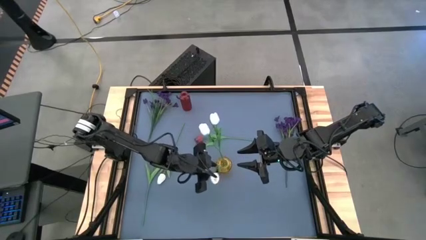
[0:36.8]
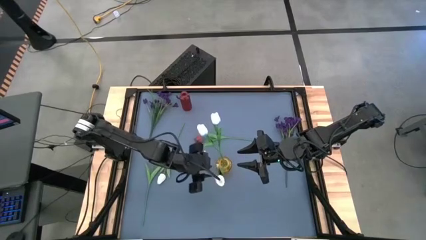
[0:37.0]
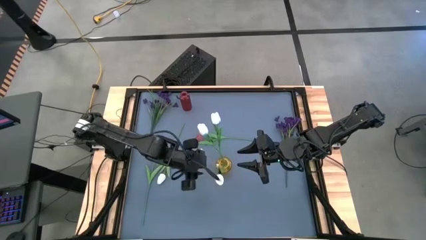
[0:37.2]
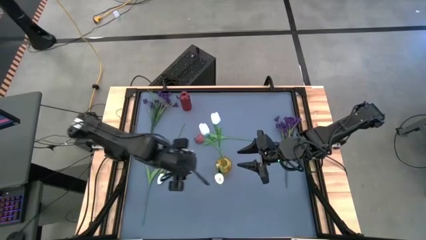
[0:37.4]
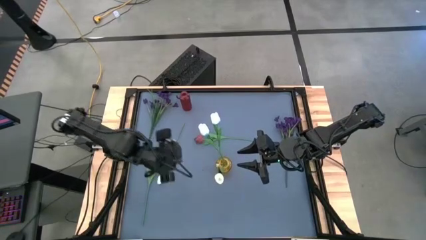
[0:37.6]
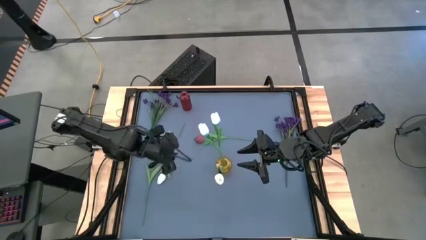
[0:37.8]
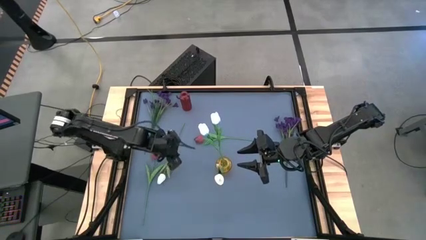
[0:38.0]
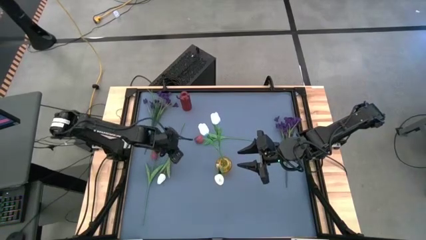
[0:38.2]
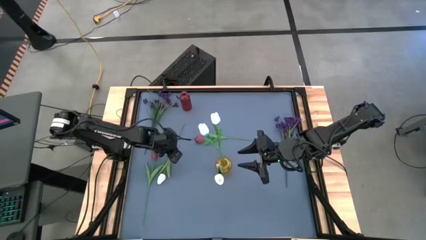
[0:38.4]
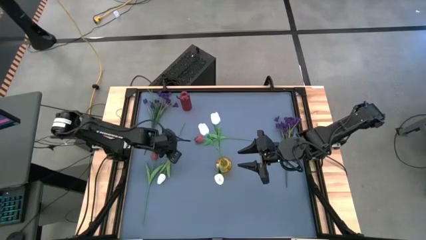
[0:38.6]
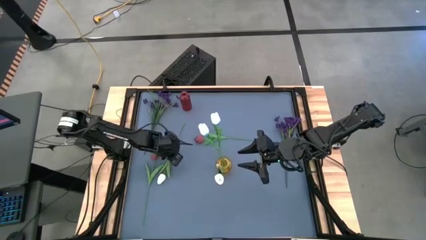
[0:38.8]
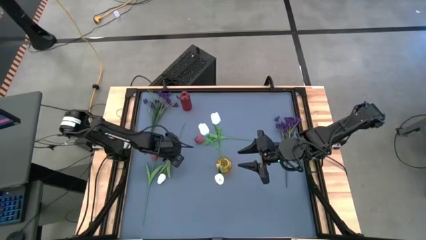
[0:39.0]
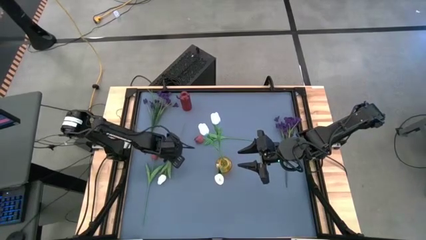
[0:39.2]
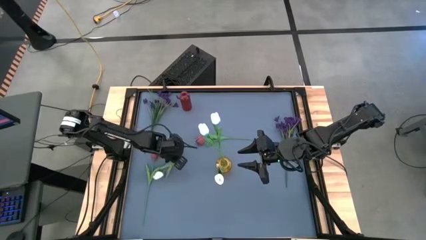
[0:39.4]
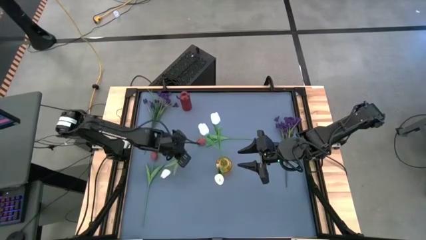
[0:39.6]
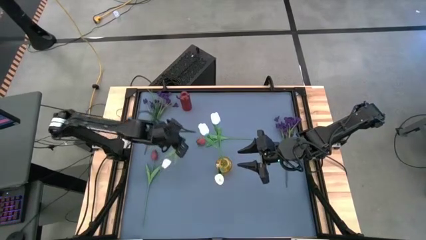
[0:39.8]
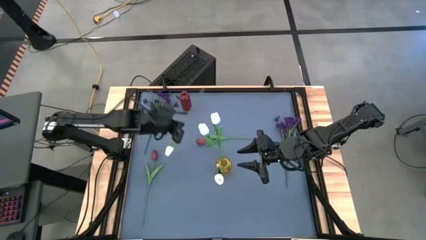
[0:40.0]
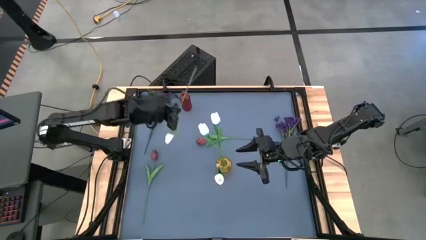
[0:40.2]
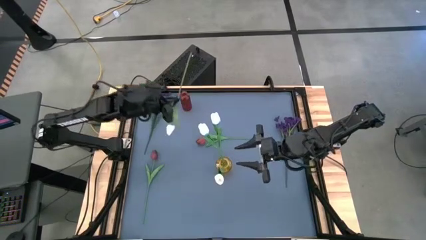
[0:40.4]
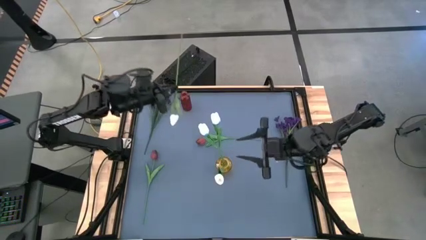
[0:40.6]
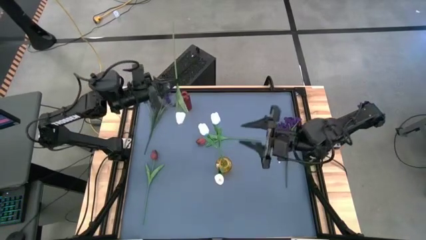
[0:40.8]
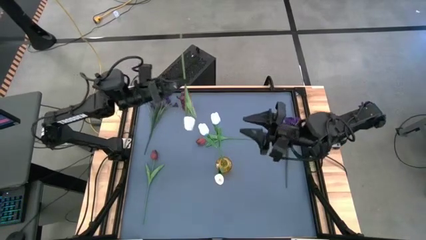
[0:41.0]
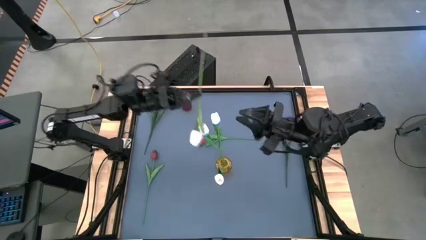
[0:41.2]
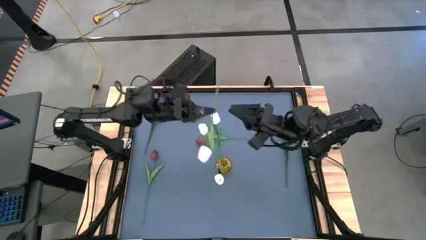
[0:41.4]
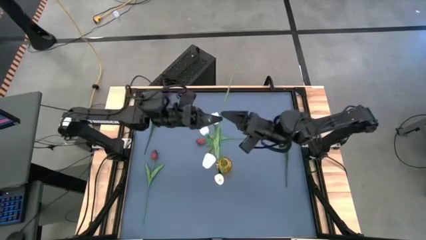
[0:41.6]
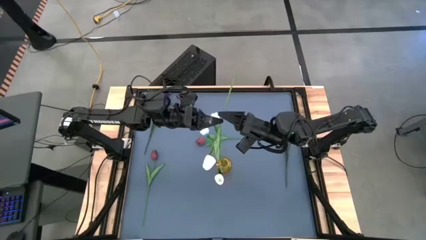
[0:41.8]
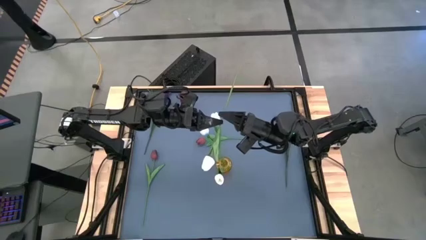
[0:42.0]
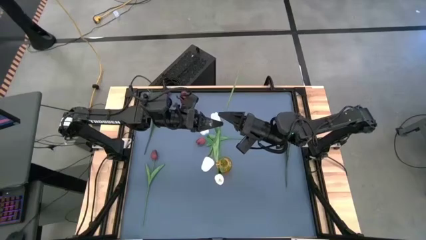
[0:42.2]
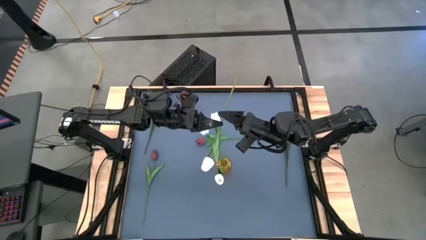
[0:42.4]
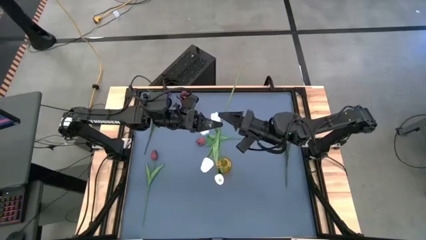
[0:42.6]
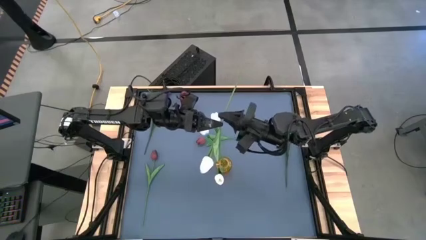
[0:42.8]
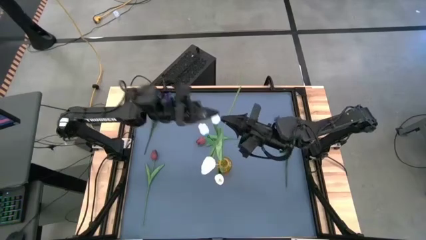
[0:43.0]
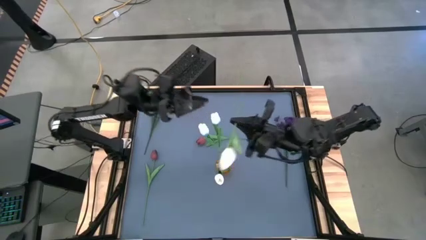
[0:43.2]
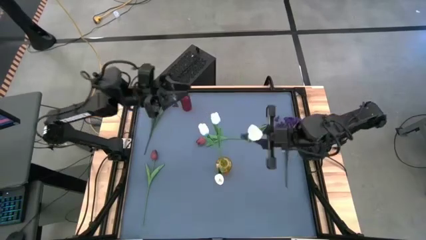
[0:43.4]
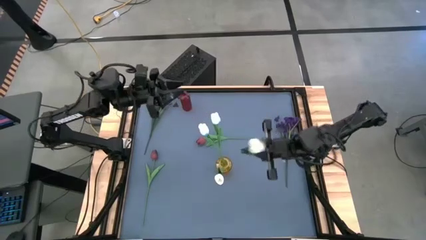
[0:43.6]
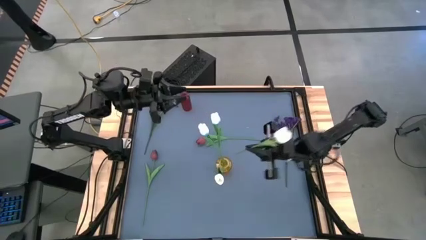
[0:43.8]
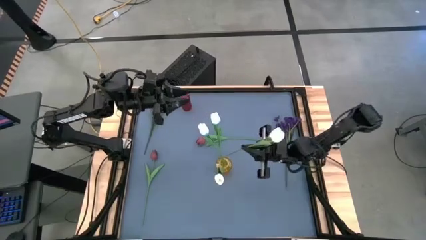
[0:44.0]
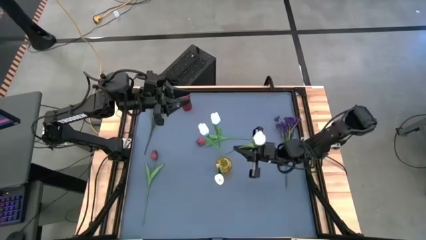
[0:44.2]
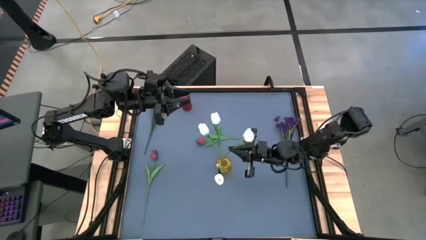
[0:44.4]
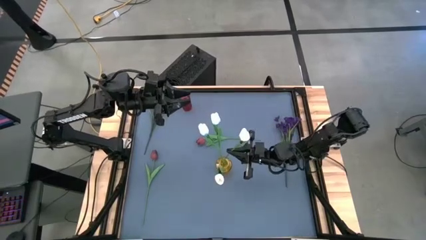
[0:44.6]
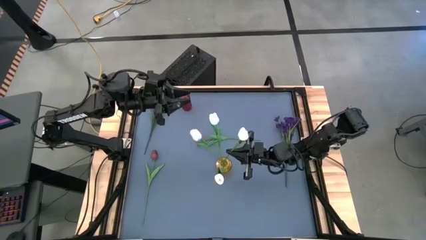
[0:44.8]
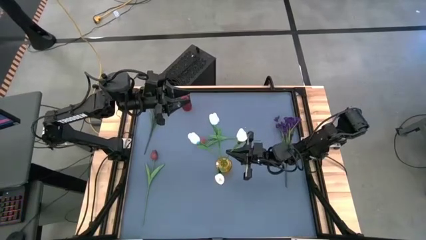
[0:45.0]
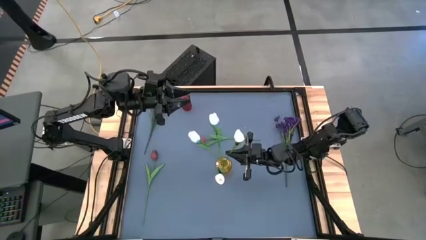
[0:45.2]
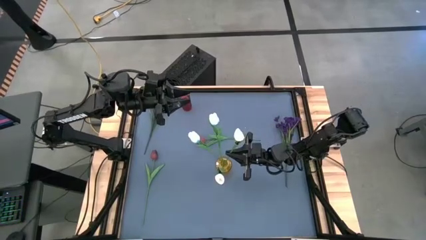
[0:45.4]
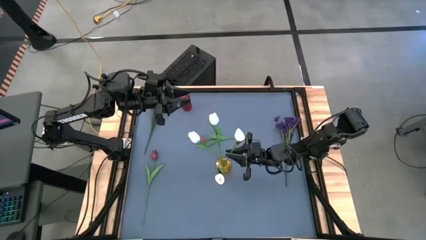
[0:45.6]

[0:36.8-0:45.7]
Task: Sort flowers into vase by color
Put the white flower into the yellow vase

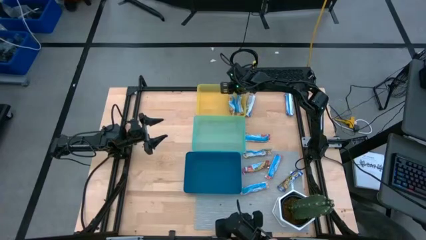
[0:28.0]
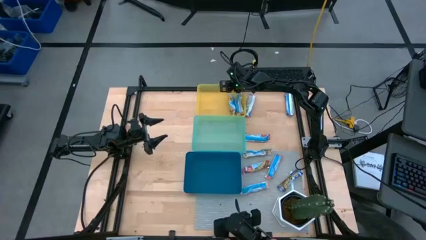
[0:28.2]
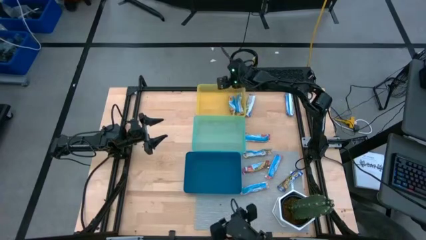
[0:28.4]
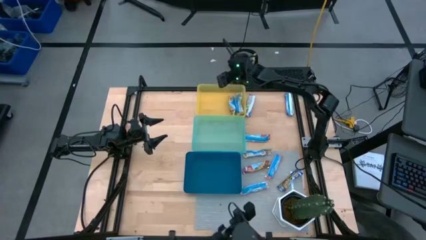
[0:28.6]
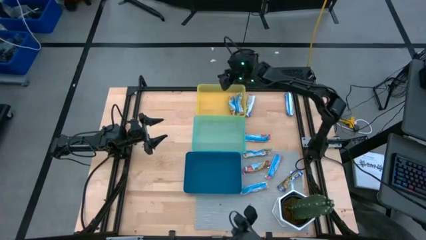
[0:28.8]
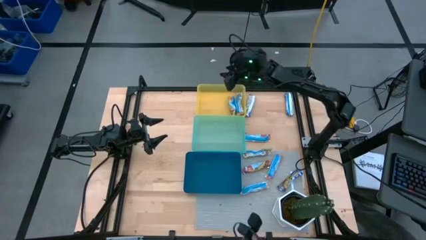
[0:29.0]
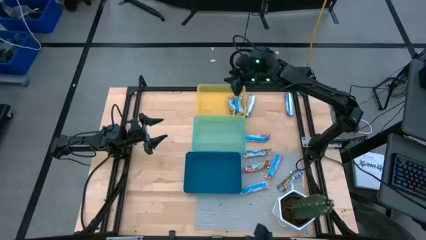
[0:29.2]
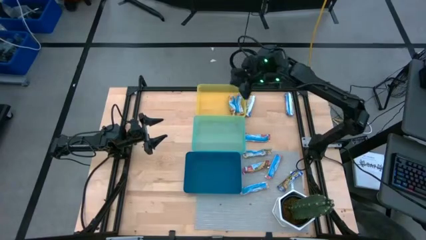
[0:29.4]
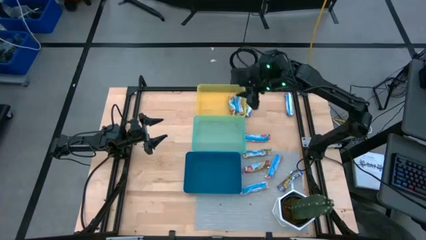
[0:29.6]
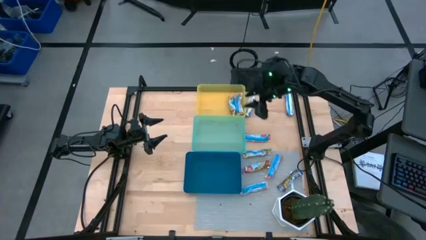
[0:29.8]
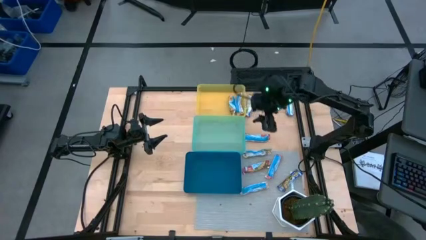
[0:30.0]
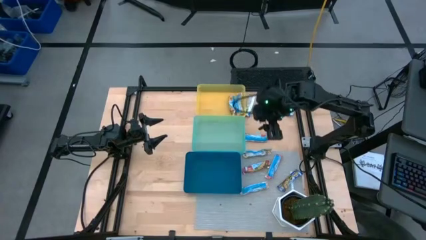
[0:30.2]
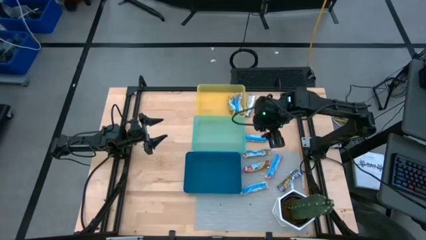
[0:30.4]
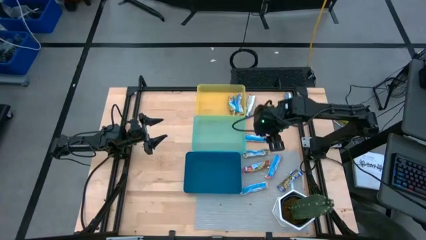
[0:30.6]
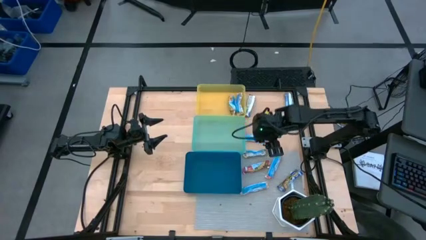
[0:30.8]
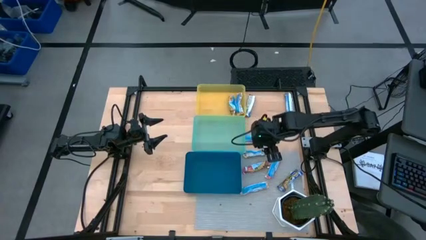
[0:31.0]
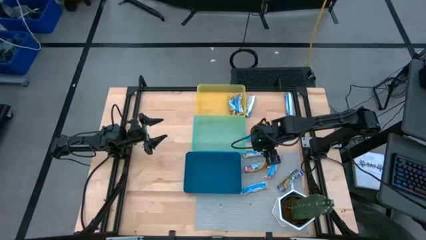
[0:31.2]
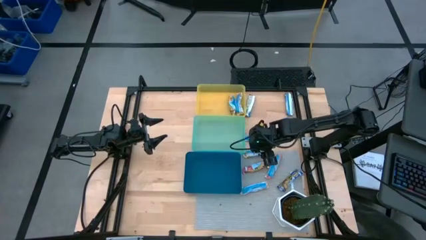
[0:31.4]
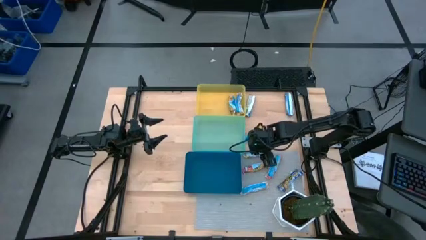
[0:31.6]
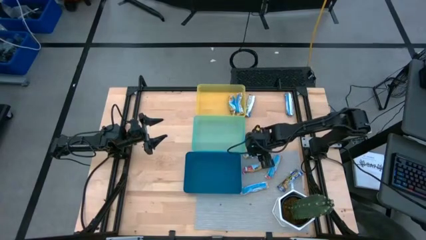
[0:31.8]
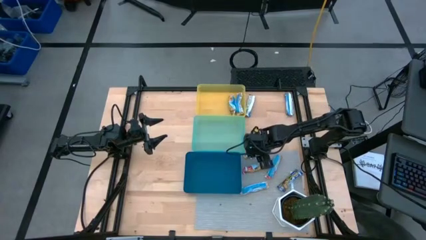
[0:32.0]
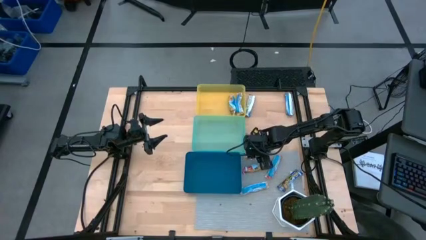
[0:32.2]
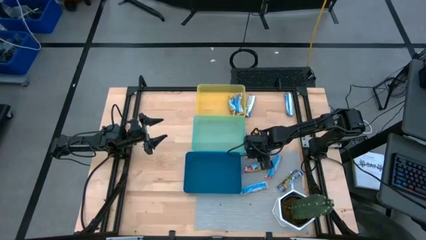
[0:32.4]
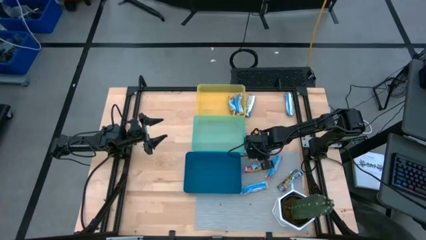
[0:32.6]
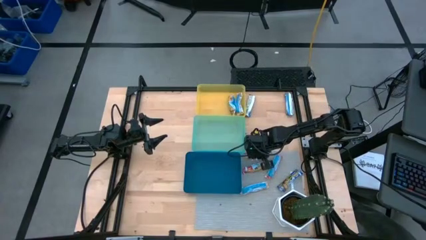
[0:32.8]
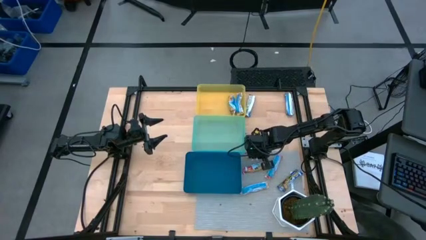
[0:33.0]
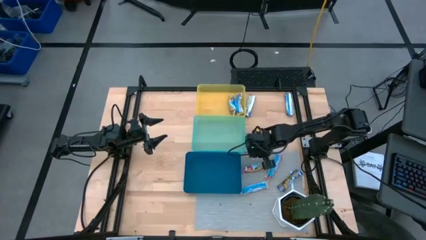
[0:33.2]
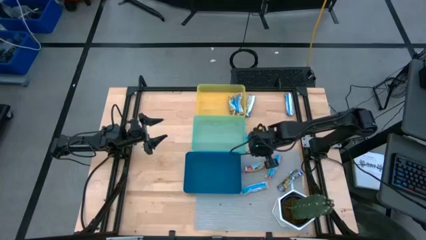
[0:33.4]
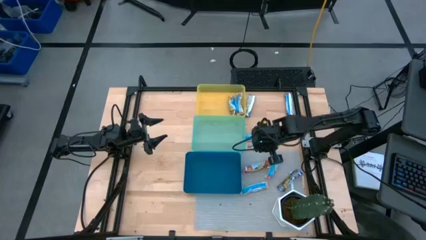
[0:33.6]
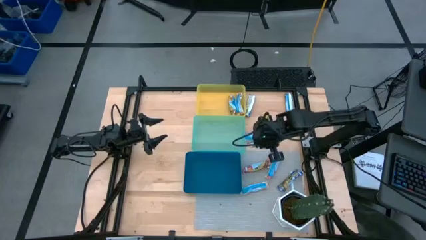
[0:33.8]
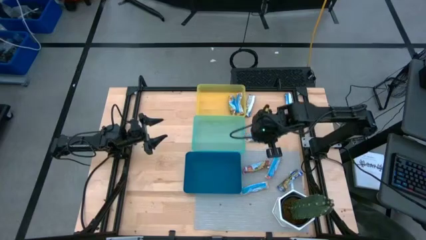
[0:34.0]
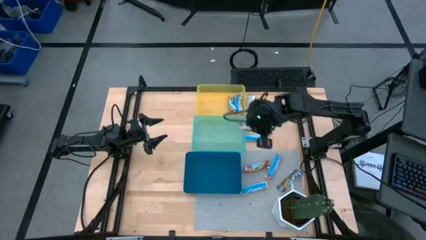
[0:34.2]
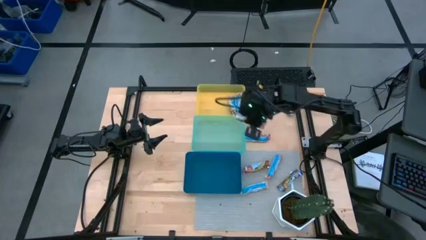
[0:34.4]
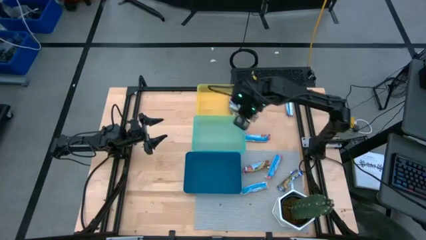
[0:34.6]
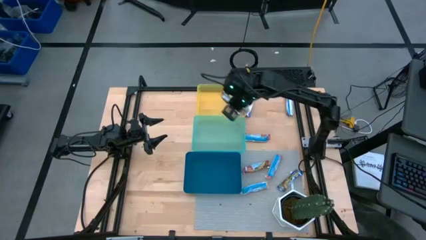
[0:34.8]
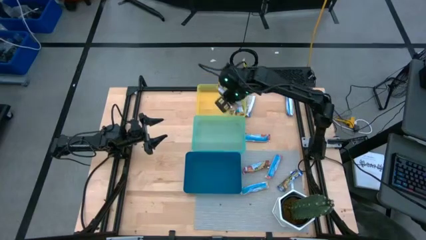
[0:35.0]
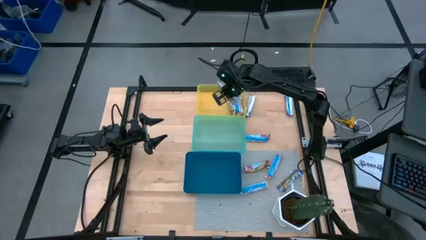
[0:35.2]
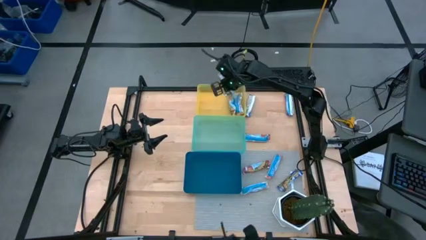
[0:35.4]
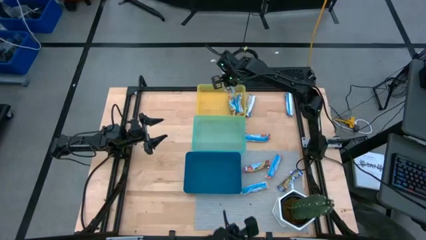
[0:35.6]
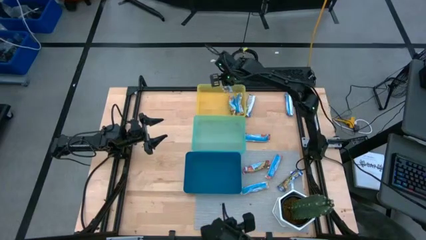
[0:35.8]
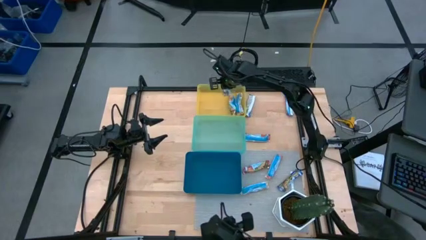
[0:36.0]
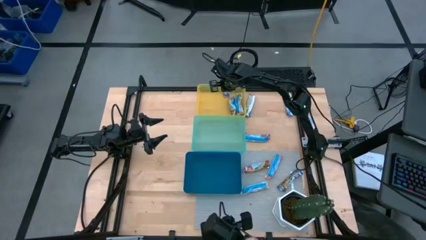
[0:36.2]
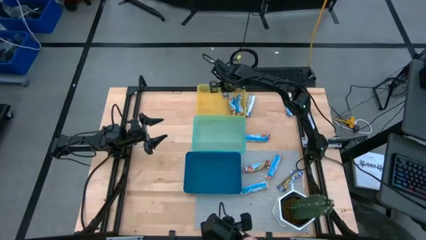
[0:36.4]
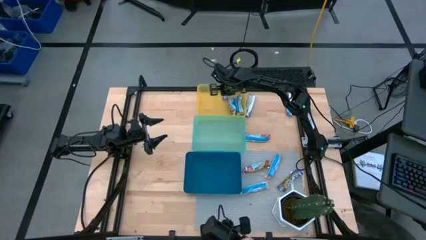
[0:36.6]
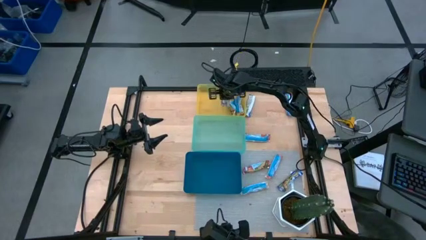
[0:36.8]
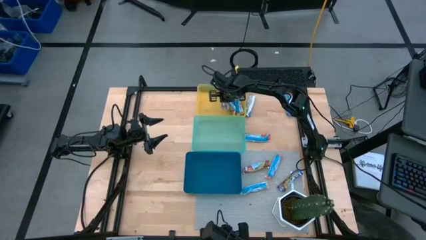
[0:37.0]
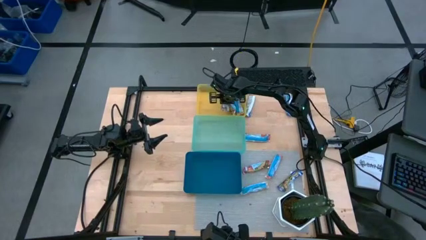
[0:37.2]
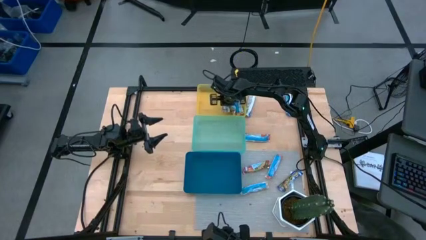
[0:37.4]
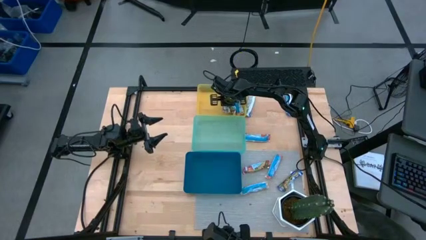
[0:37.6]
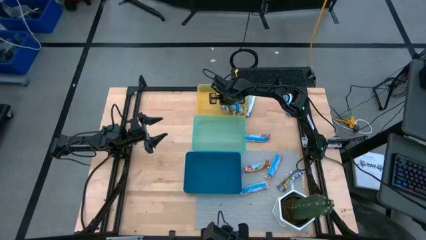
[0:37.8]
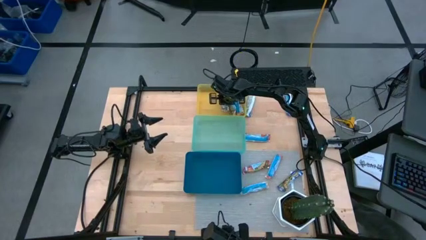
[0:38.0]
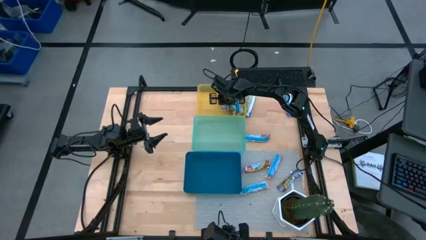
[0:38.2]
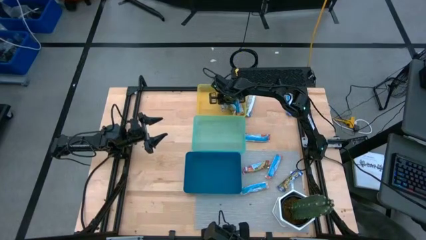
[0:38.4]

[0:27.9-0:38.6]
Task: Pick and place Granola Bars by type
Put the yellow granola bar into the yellow bin
